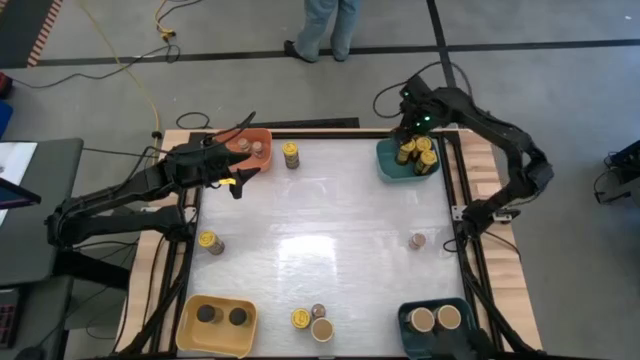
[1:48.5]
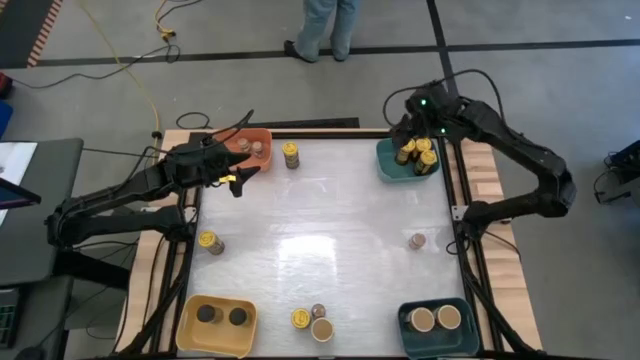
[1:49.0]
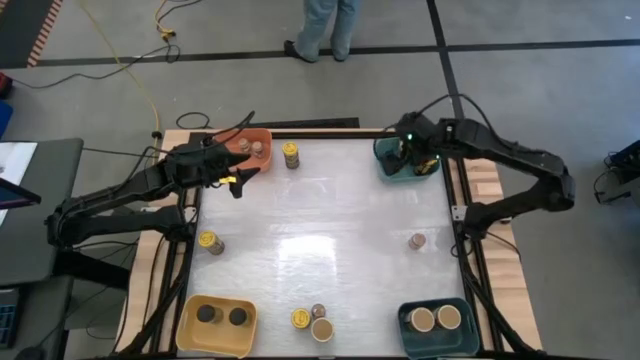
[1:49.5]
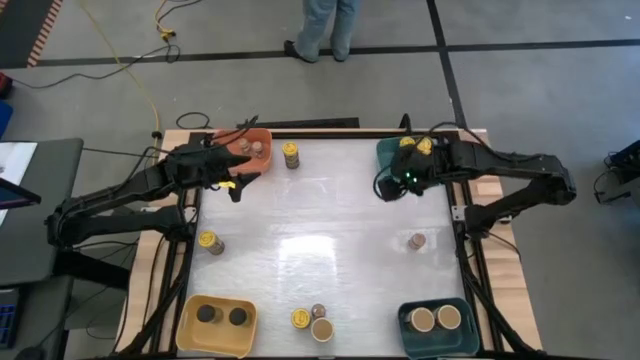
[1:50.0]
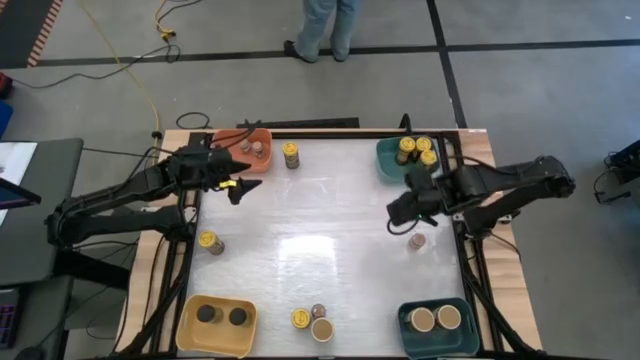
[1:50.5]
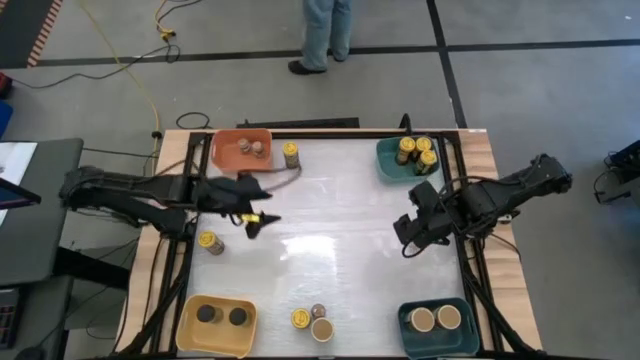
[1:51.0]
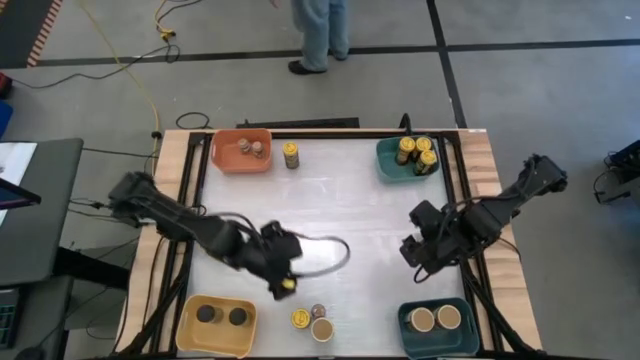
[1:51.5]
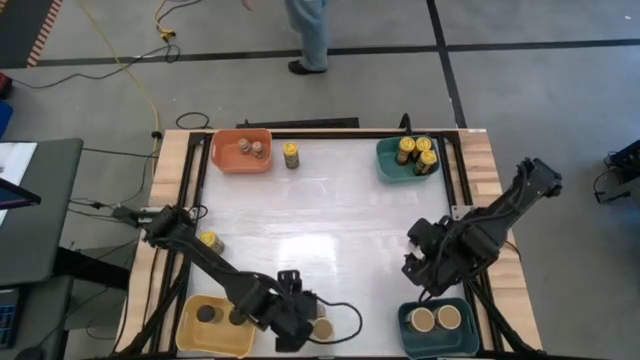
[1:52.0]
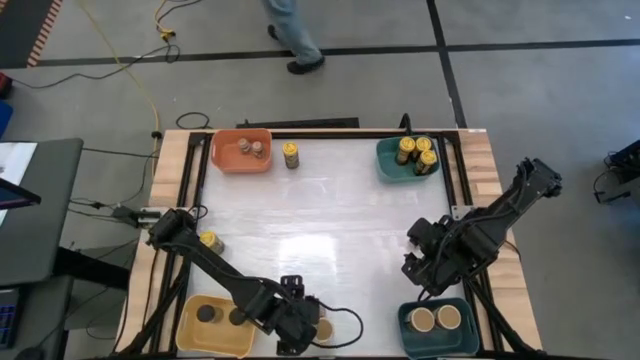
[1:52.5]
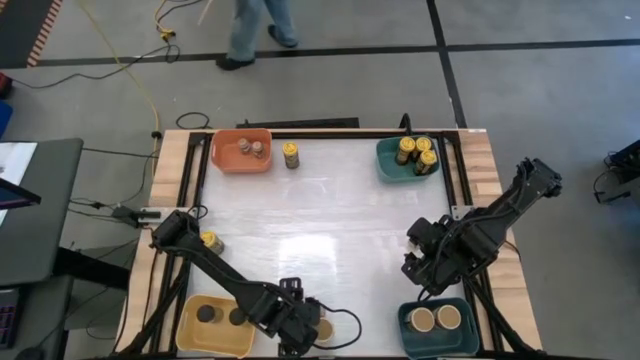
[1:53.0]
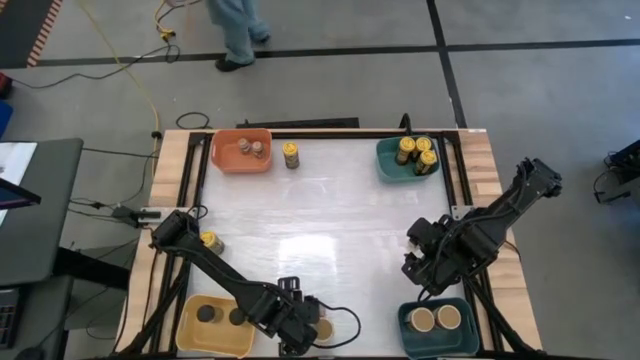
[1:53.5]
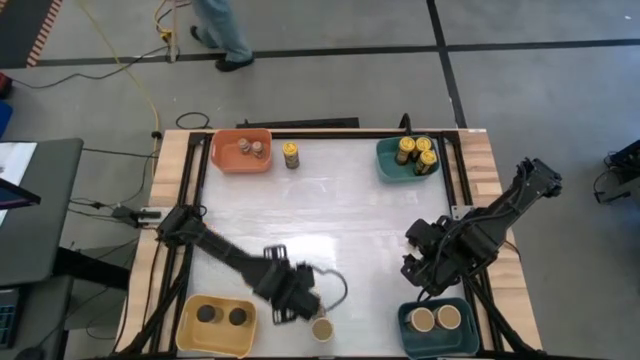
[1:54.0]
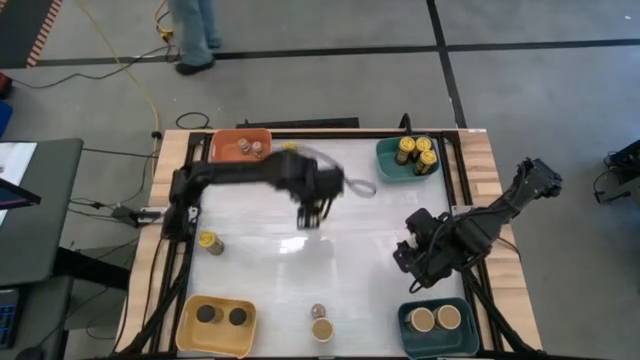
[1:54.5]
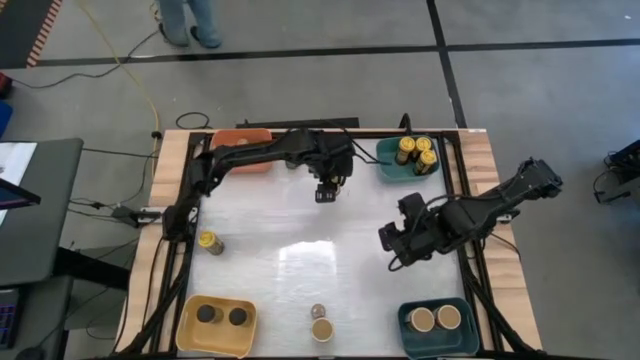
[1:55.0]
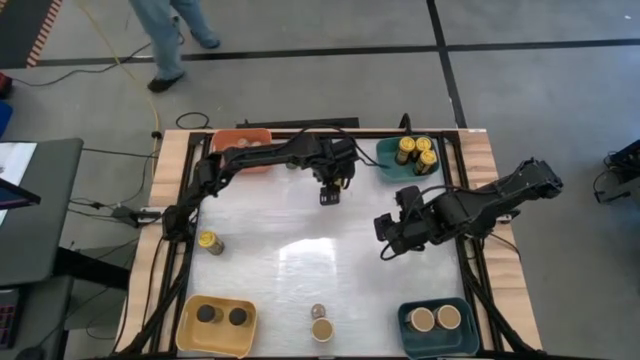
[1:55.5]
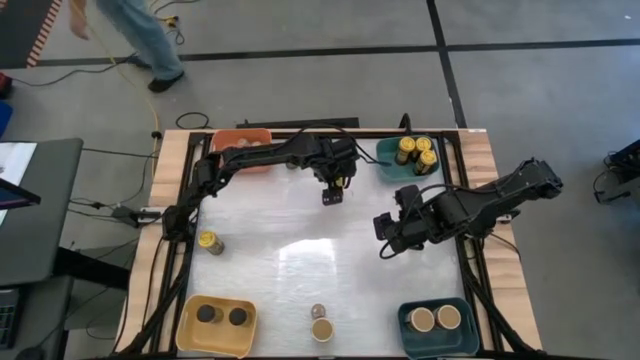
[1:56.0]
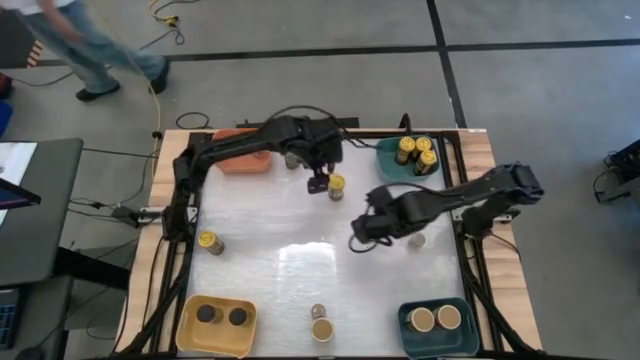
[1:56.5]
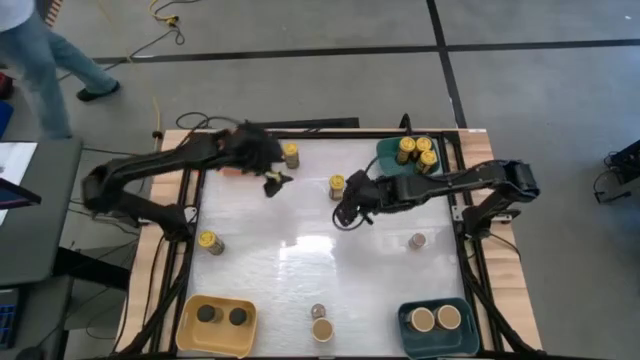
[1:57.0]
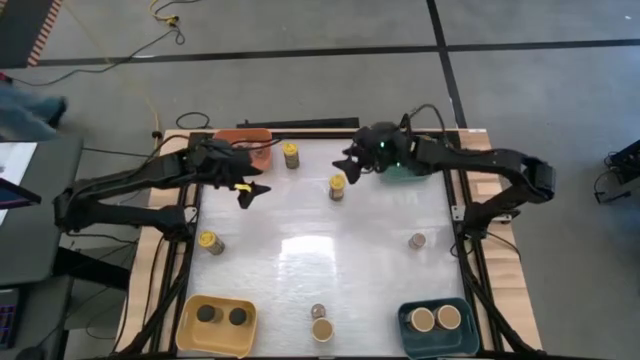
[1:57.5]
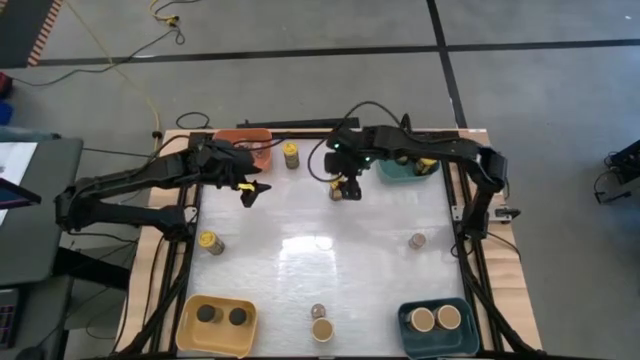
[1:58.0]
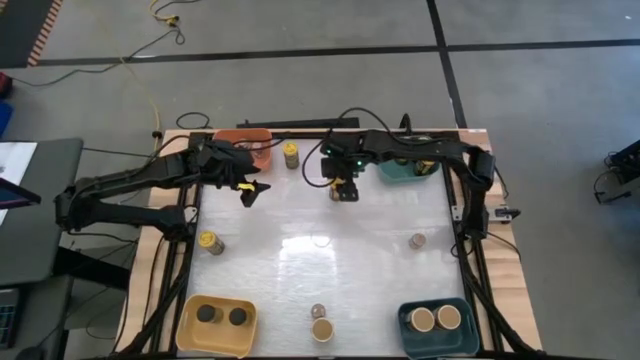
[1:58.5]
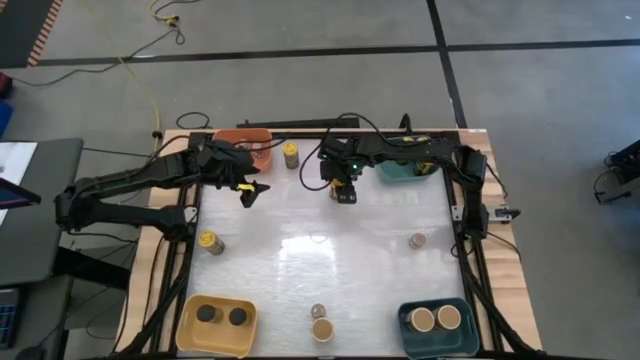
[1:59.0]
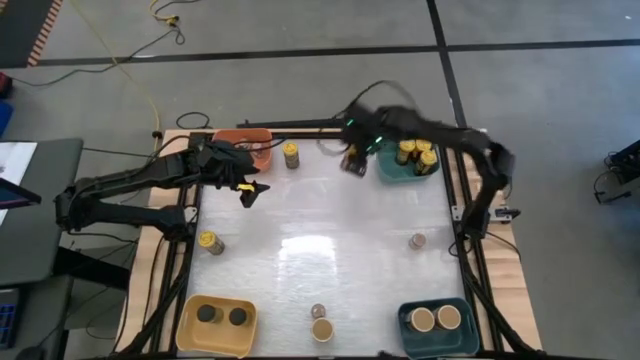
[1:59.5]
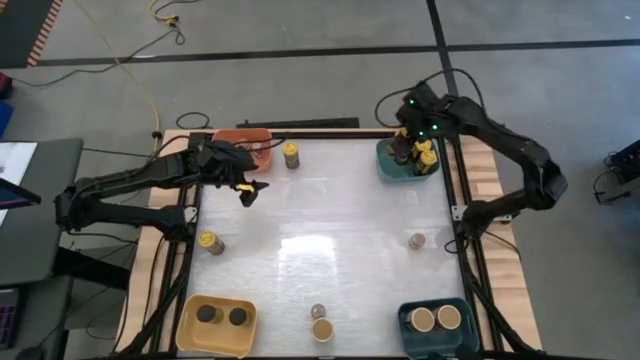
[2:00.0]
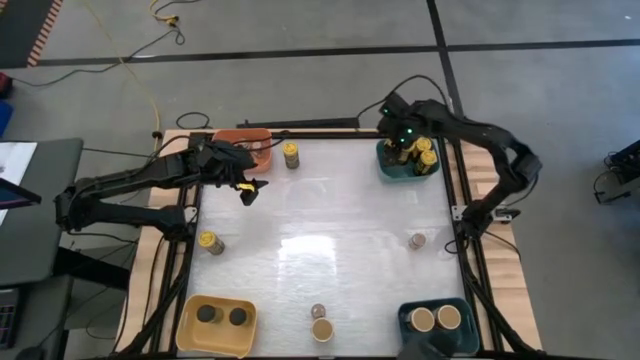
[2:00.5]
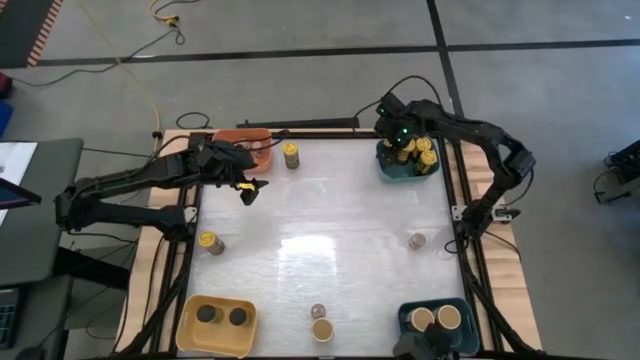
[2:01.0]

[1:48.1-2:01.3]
Task: Sort spices by type
Put the bottom yellow seasoning bottle into the light blue bin

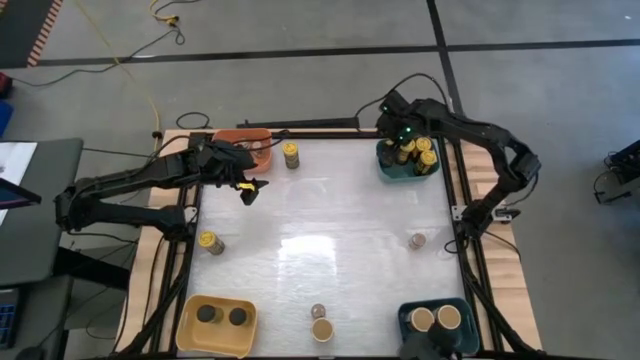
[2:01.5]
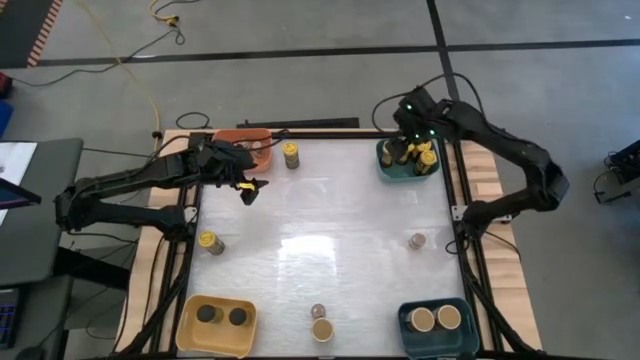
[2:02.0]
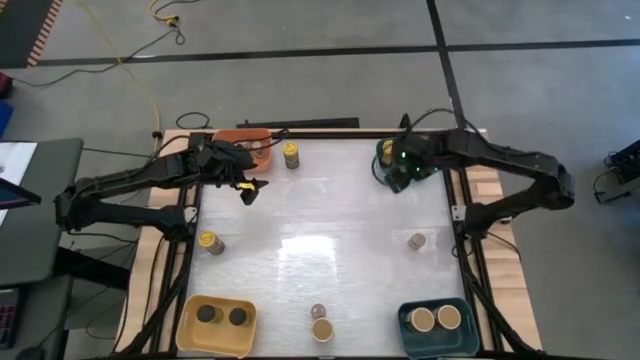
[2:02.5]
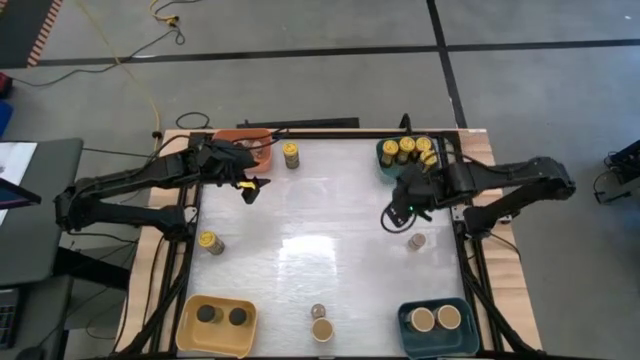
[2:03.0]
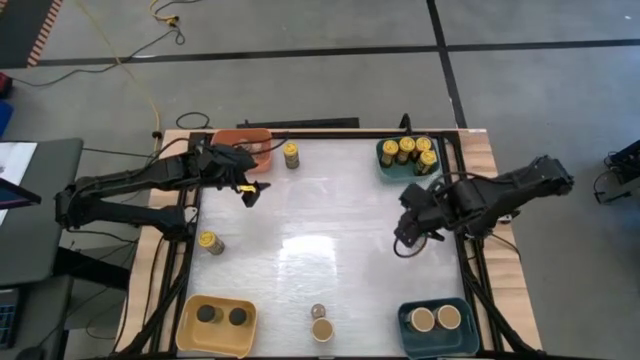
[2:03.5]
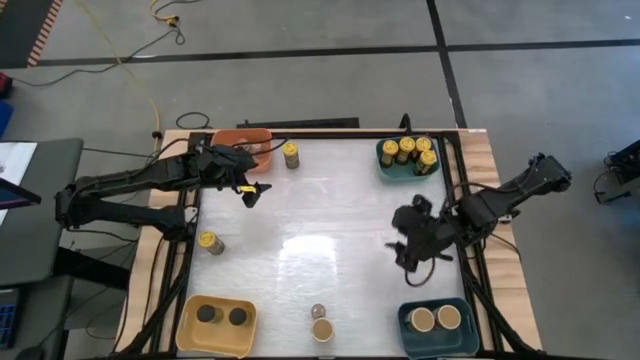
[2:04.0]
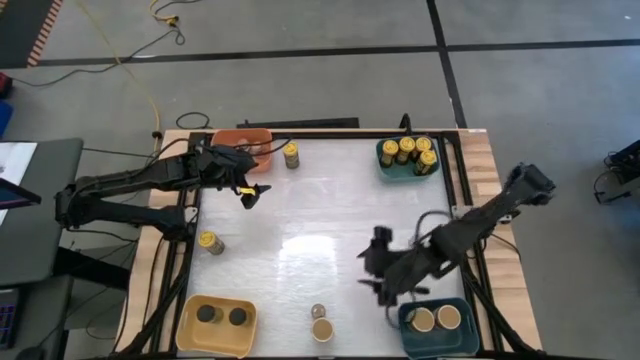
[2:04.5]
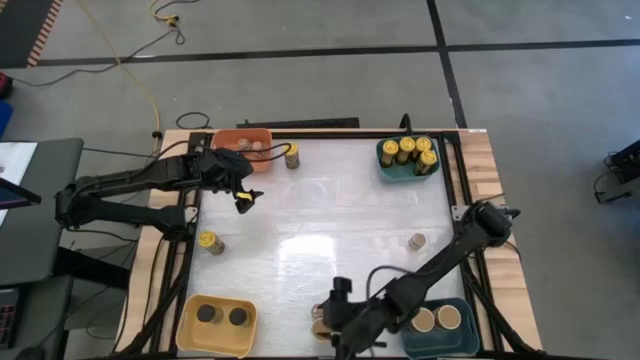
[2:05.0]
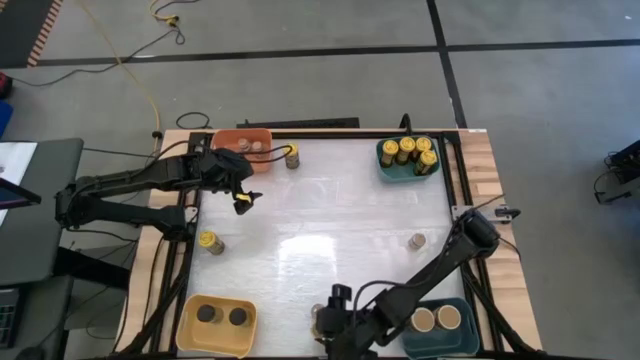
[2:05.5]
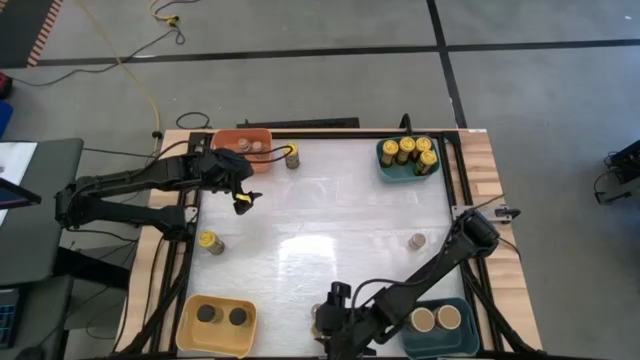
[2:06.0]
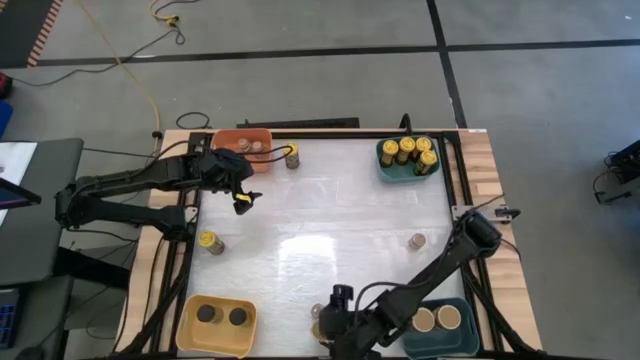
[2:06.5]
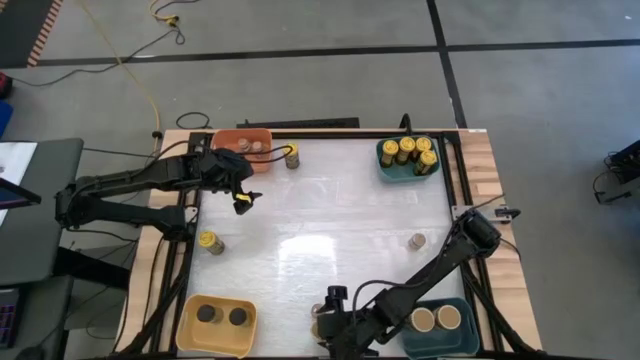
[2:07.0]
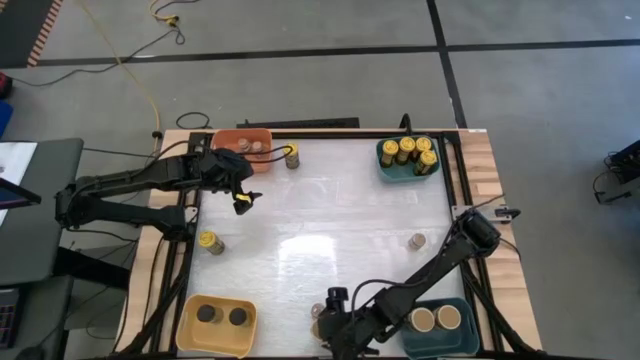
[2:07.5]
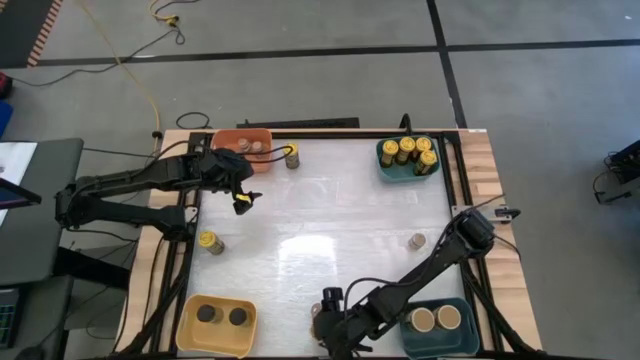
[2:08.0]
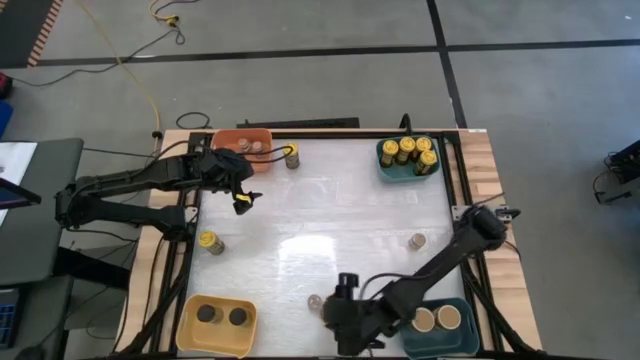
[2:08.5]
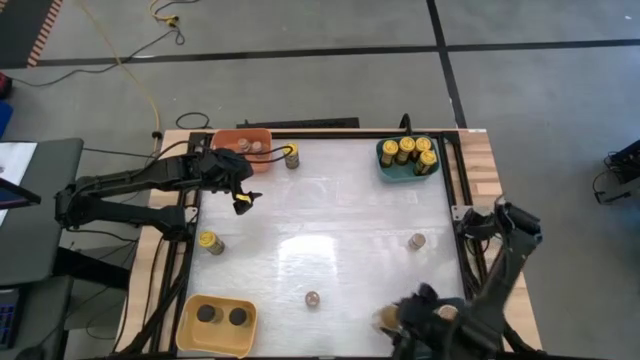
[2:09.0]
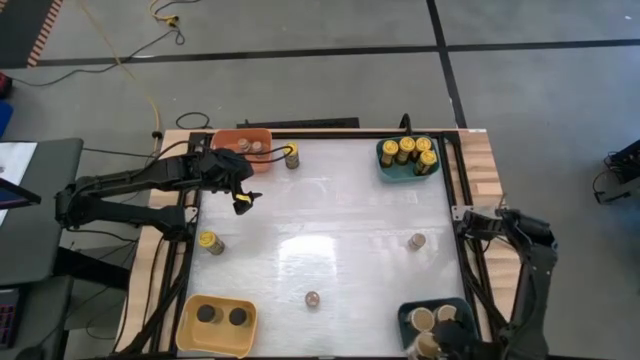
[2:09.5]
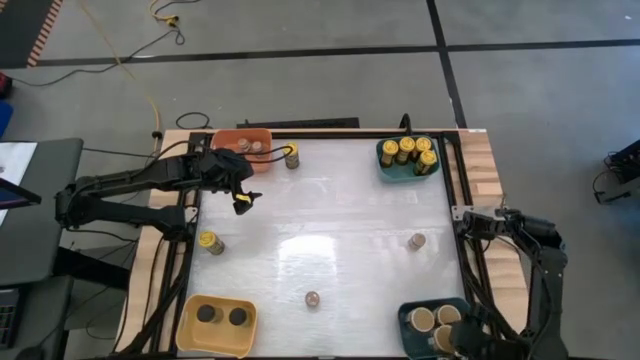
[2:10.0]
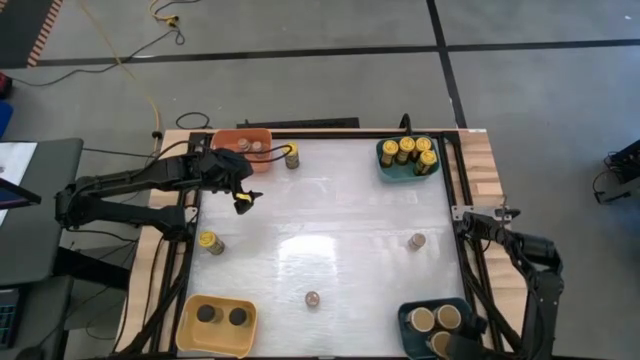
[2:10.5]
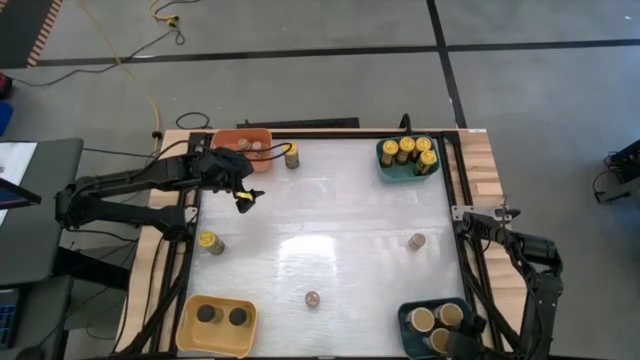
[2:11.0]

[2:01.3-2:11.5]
Put the gold seasoning bottle into the bottom teal dark blue bin
